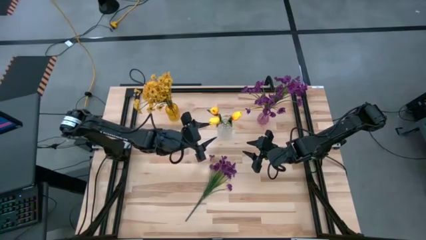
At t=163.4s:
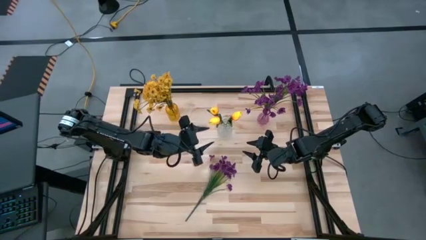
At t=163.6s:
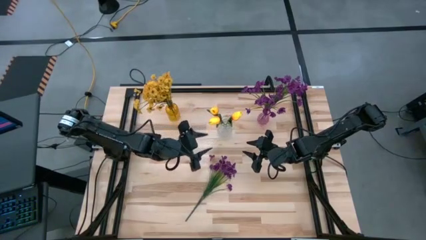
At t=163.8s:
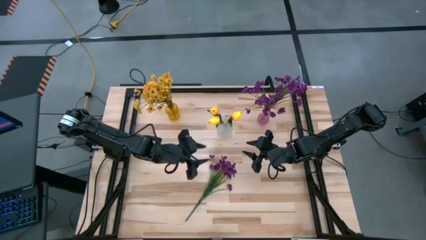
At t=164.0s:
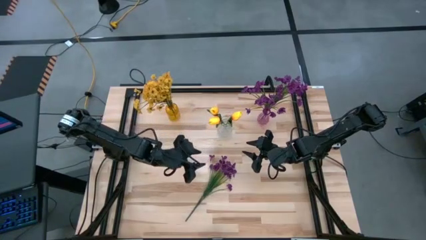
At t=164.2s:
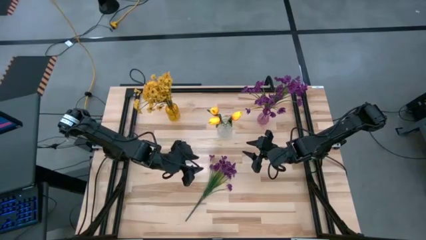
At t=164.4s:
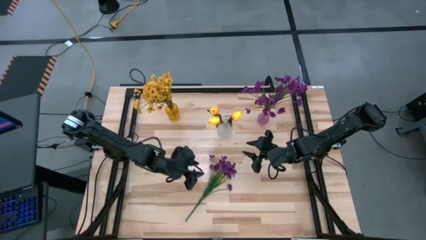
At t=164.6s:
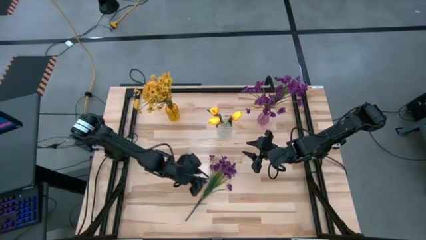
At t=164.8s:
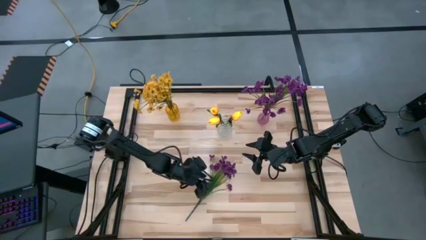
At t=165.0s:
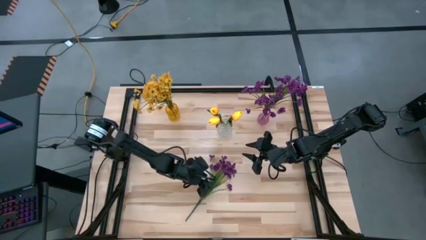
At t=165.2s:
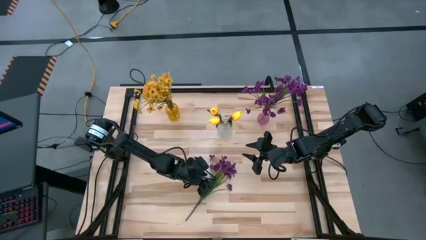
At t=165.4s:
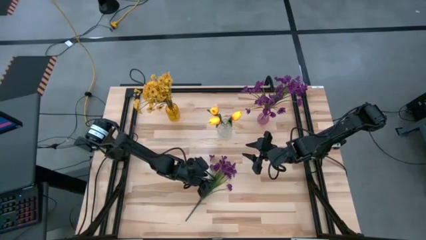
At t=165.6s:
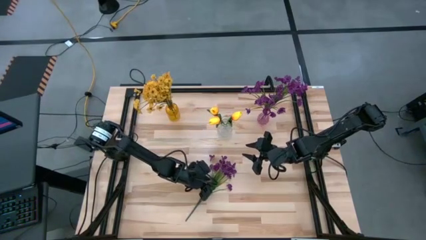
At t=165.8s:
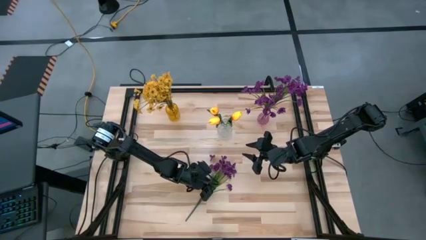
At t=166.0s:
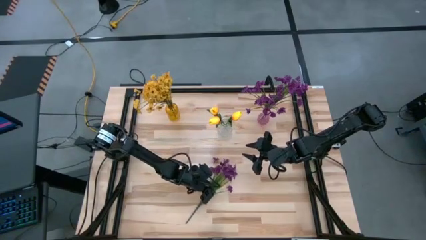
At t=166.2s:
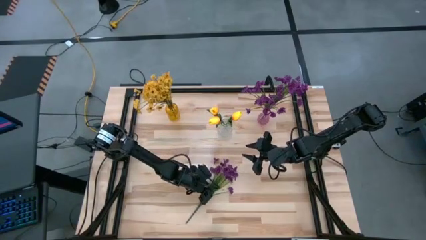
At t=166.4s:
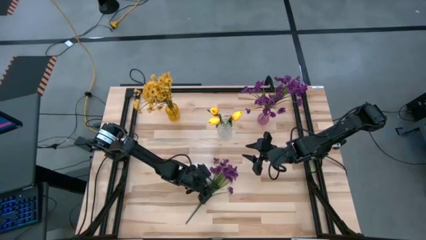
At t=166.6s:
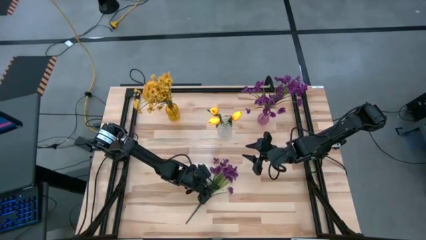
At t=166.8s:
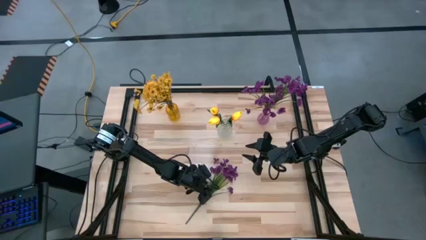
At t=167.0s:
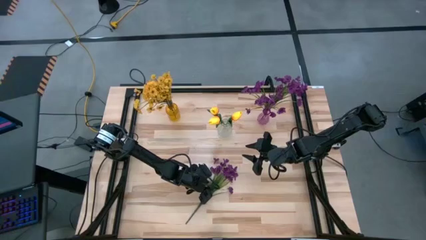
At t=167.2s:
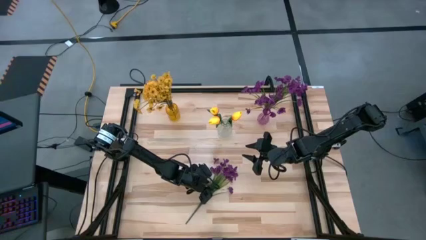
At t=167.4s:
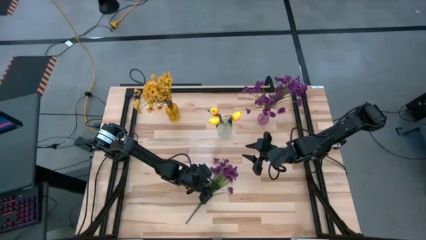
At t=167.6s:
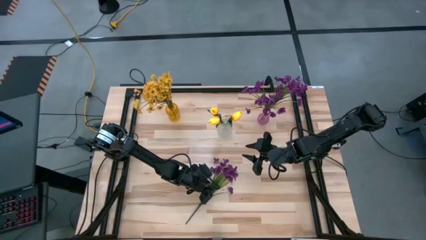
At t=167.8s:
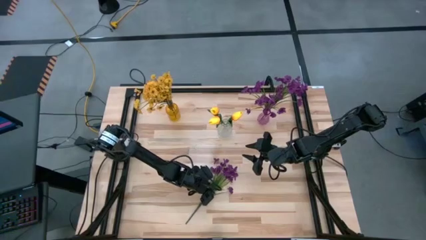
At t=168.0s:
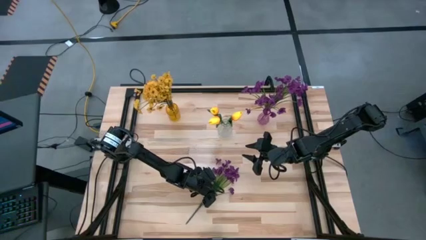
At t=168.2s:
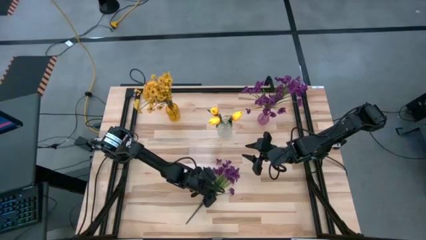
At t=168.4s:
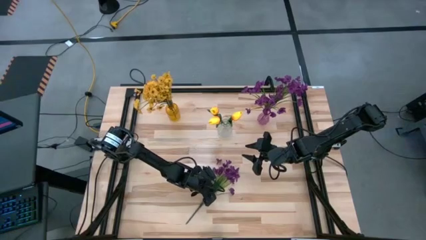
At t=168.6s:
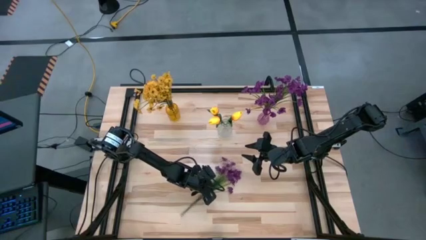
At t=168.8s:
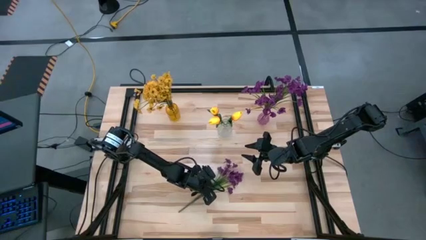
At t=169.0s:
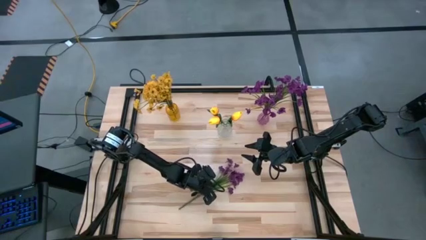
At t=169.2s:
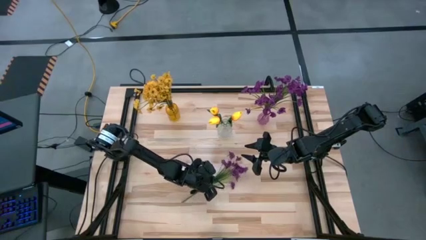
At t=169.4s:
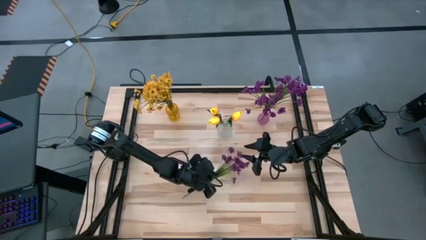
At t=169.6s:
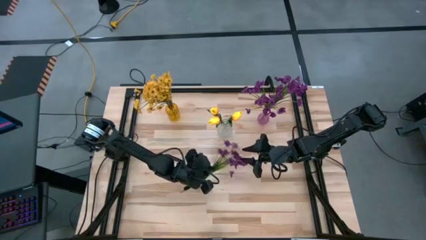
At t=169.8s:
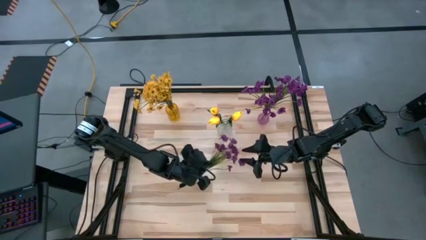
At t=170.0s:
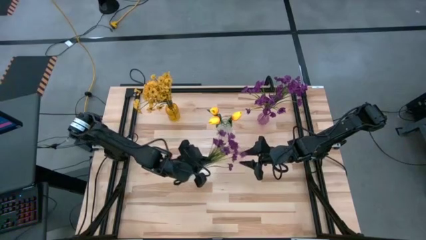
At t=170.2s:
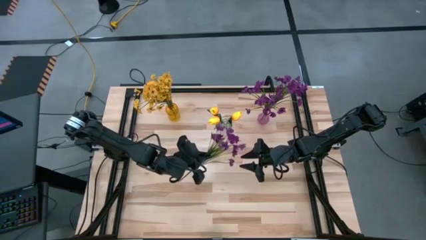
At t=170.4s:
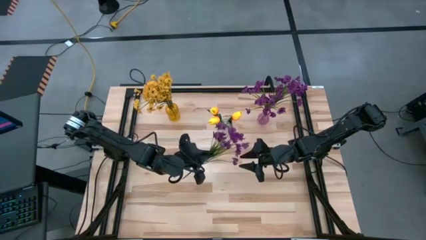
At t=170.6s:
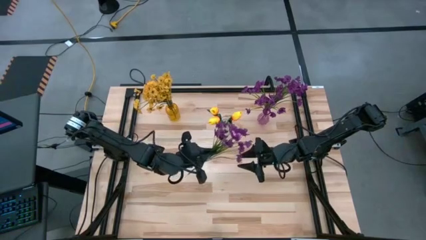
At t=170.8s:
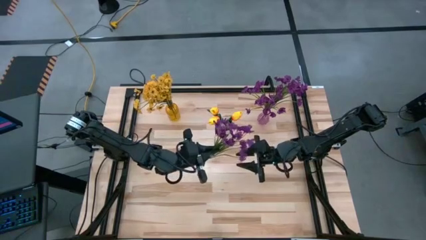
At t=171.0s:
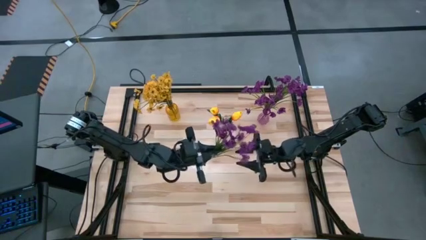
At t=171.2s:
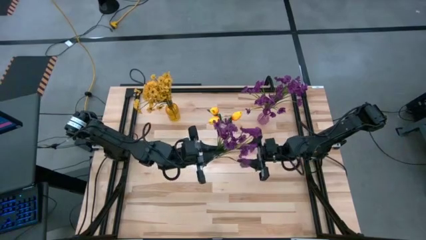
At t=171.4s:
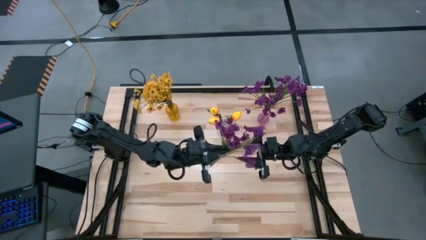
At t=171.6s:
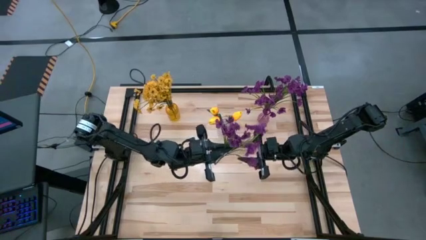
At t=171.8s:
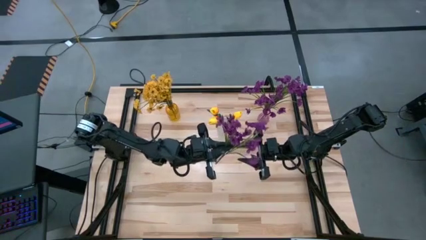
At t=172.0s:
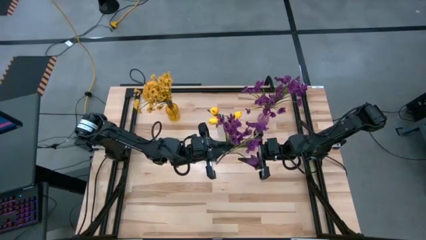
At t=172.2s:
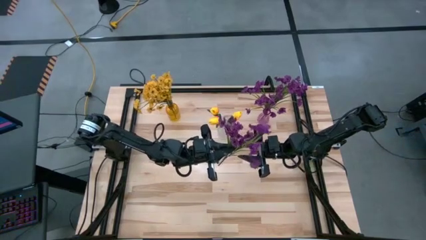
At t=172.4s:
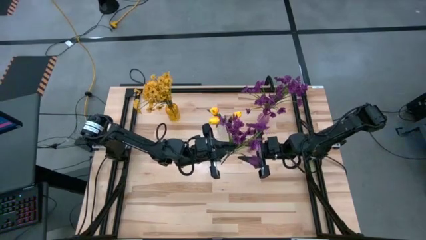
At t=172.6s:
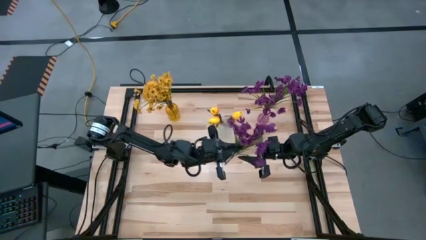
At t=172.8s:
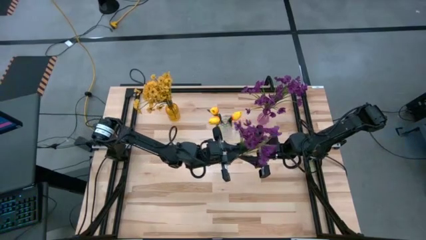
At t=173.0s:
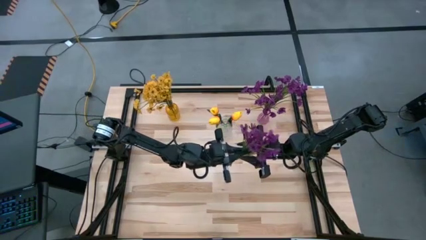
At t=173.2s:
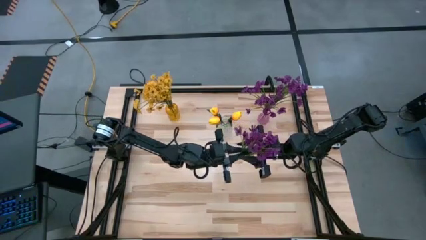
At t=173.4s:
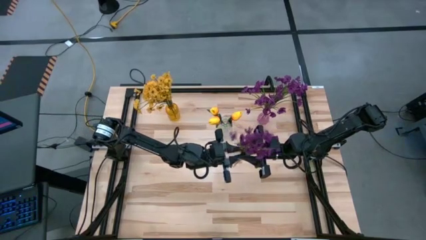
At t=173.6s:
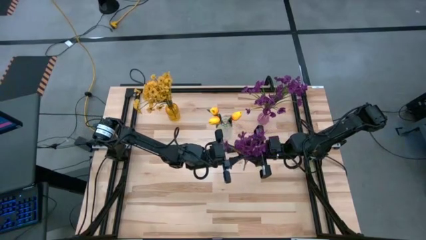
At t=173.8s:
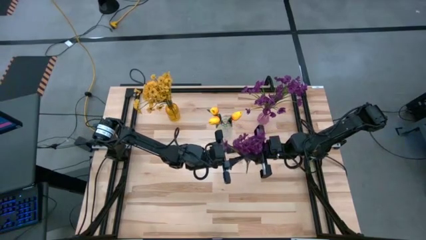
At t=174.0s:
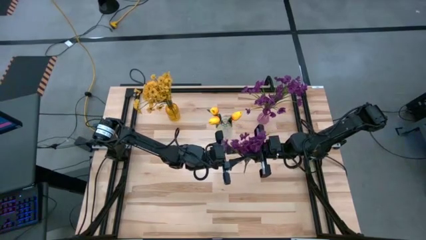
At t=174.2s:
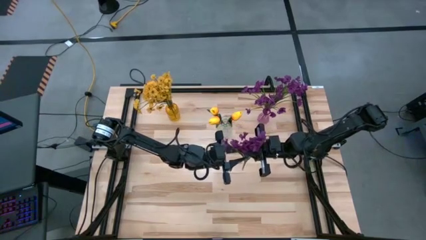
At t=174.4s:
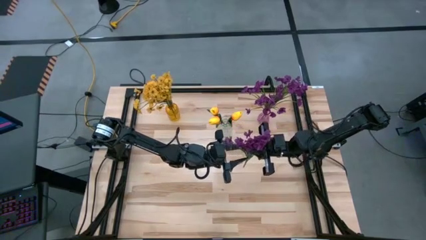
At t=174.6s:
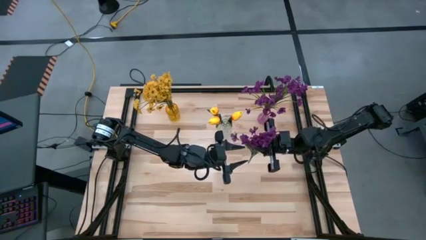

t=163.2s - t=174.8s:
Task: Sort flowers into vase by color
Put the violet flowers into the pink vase
